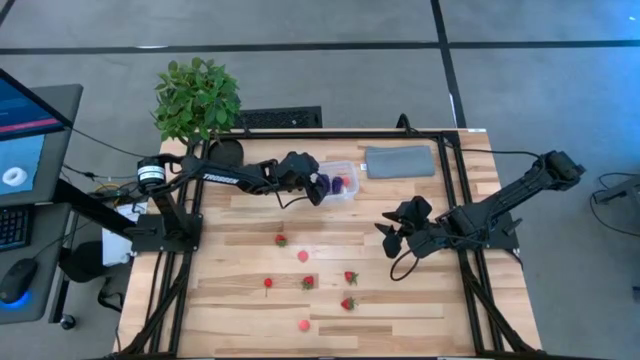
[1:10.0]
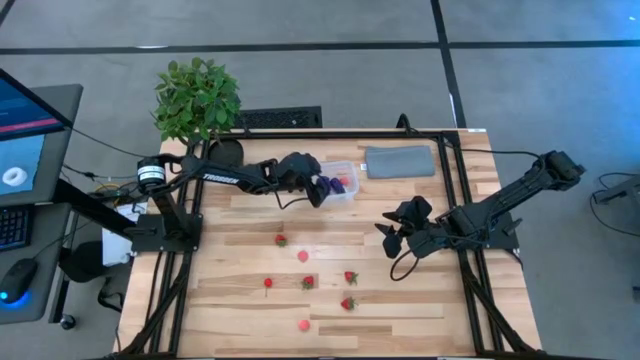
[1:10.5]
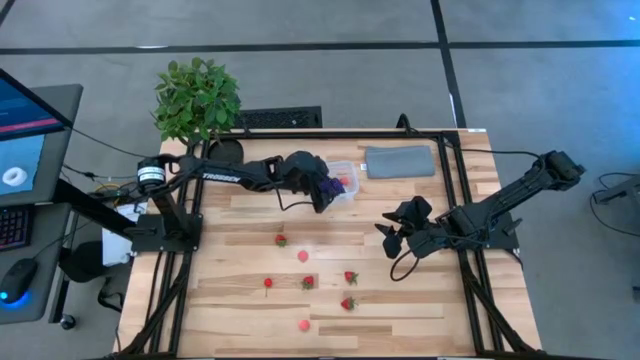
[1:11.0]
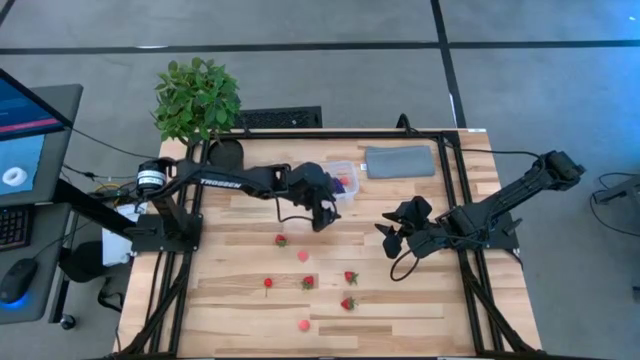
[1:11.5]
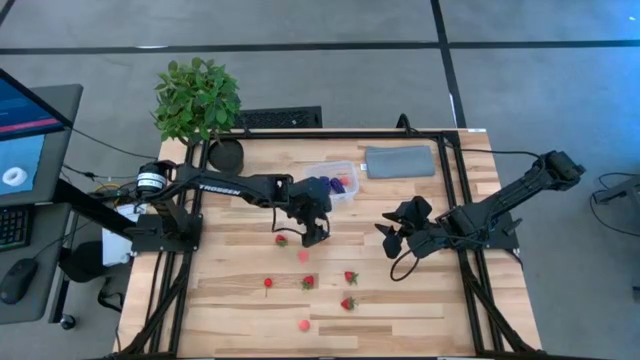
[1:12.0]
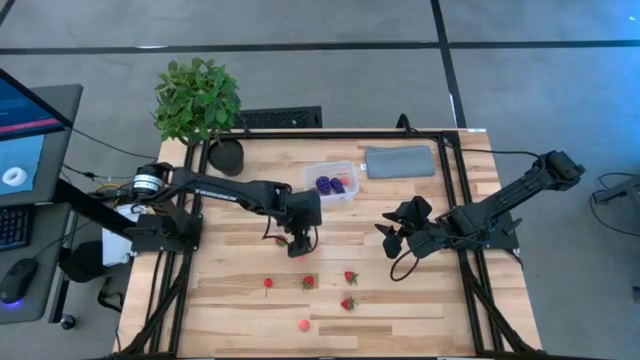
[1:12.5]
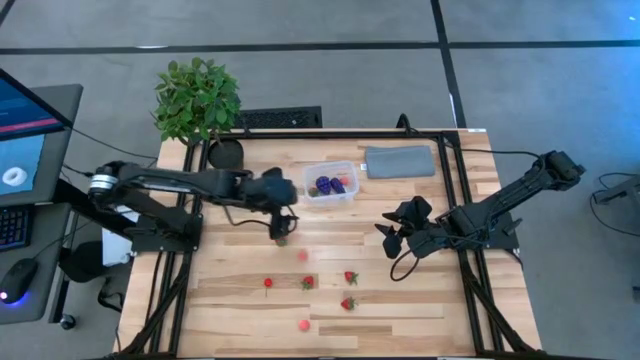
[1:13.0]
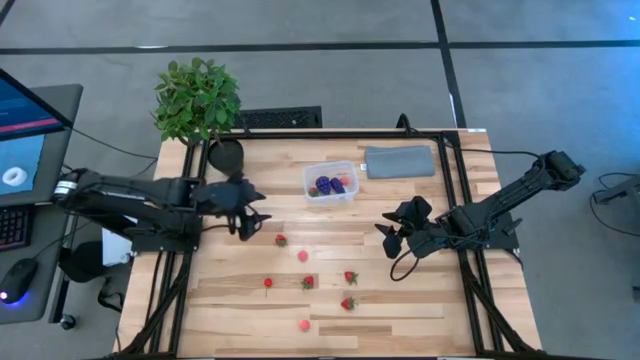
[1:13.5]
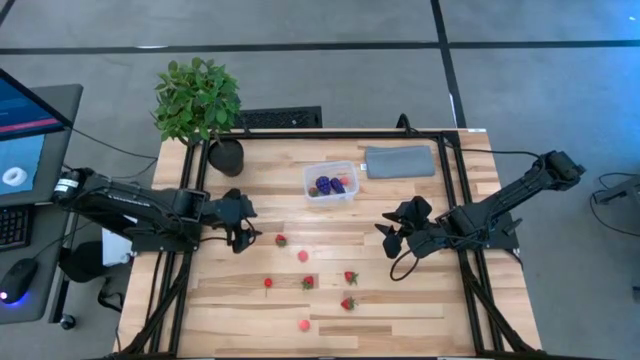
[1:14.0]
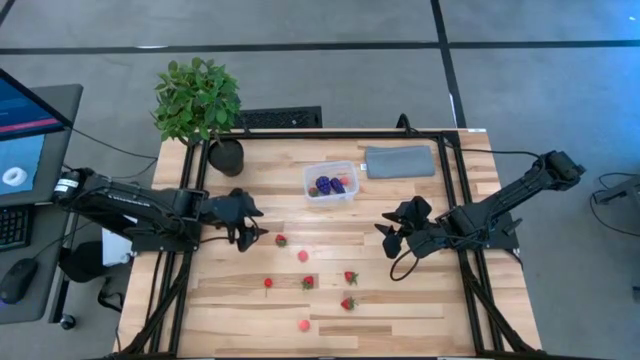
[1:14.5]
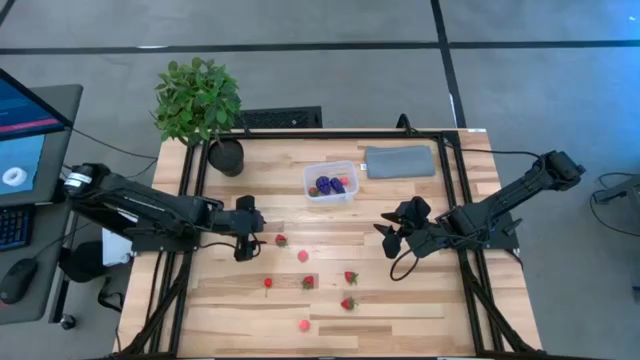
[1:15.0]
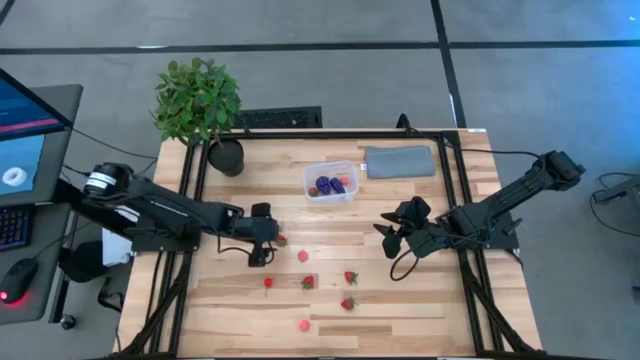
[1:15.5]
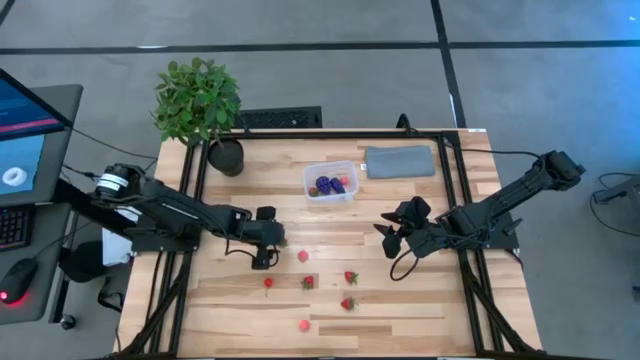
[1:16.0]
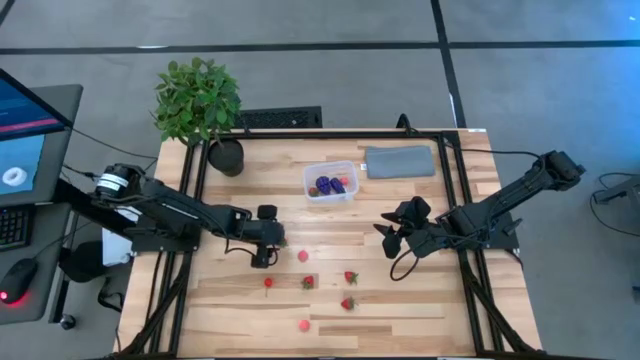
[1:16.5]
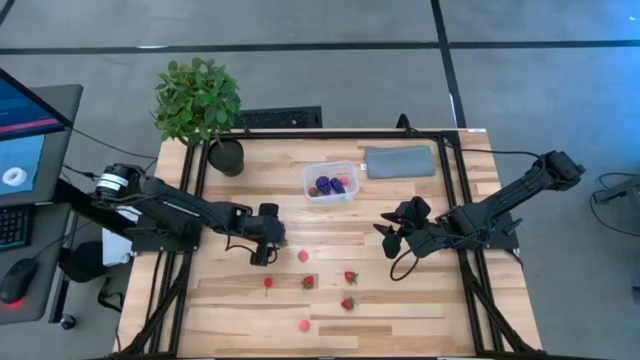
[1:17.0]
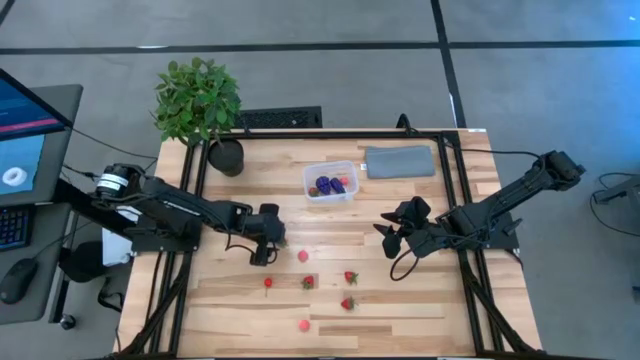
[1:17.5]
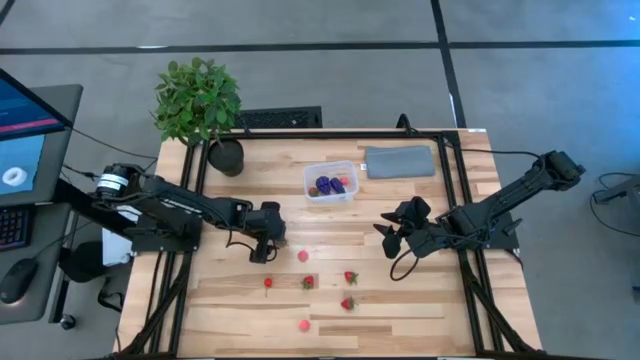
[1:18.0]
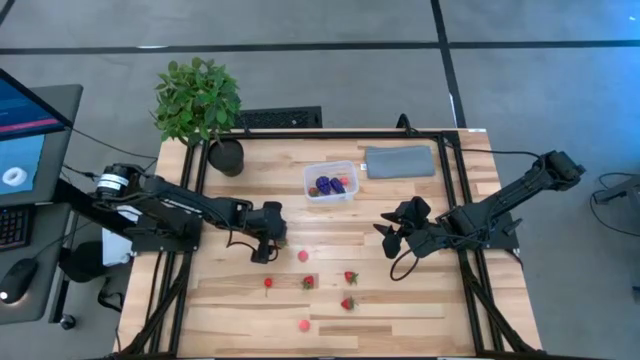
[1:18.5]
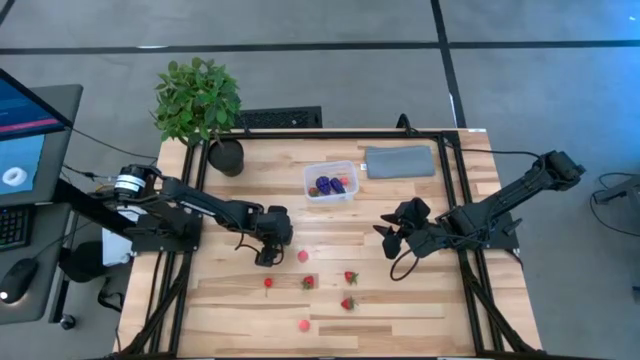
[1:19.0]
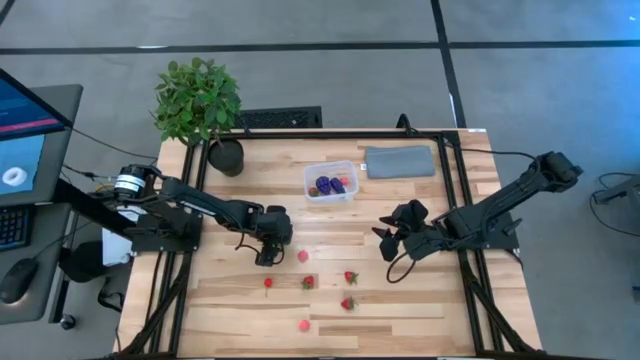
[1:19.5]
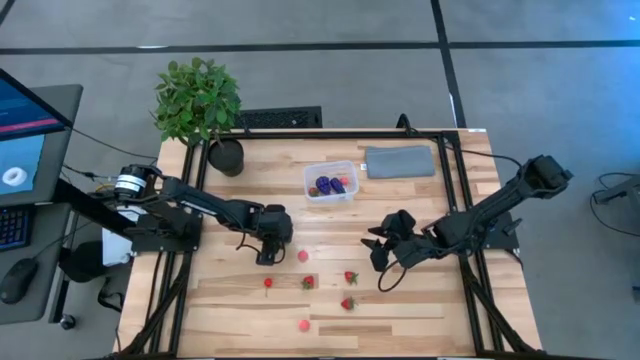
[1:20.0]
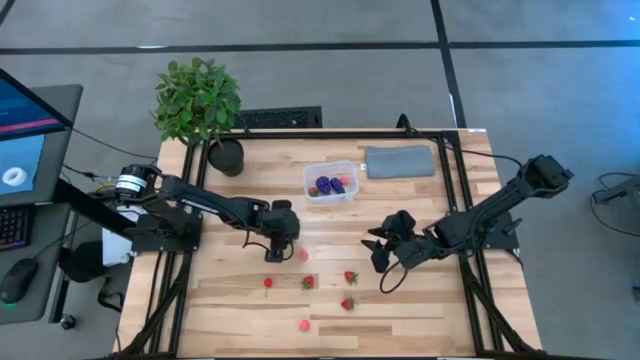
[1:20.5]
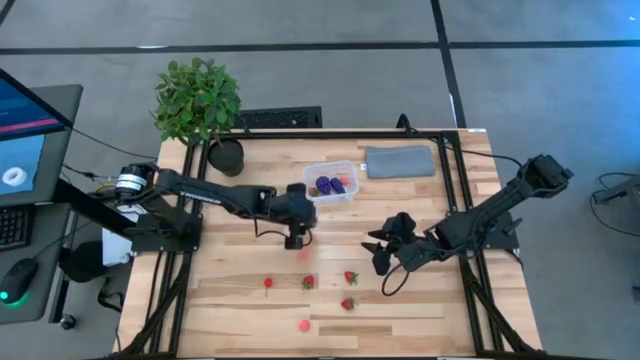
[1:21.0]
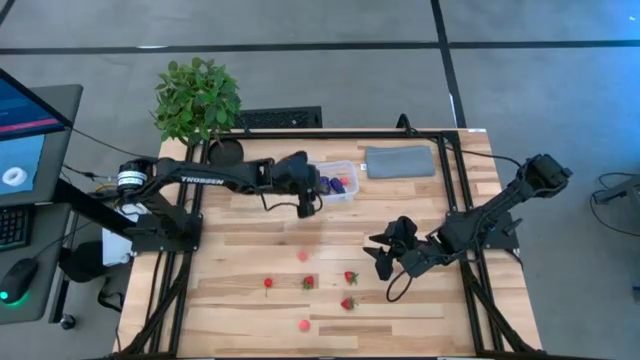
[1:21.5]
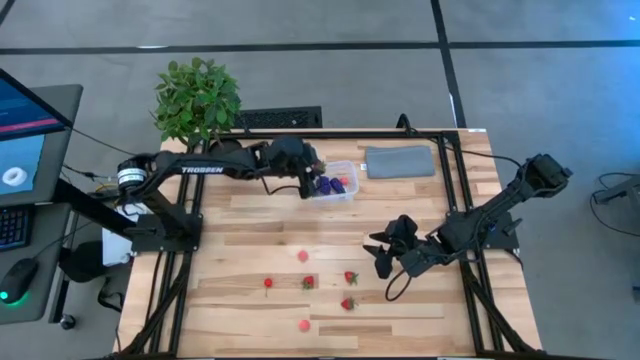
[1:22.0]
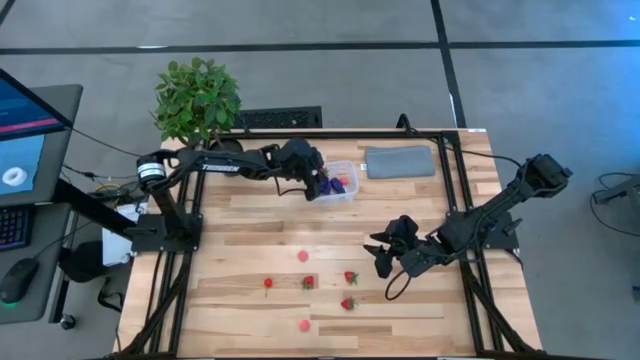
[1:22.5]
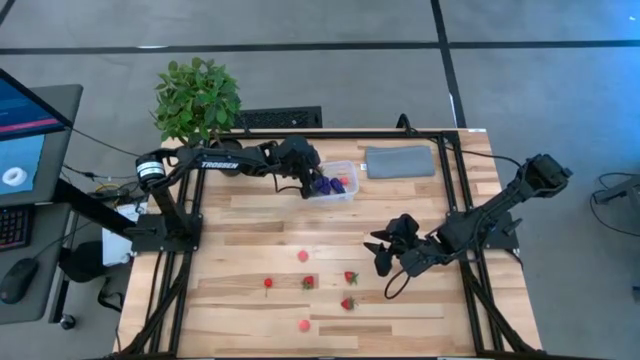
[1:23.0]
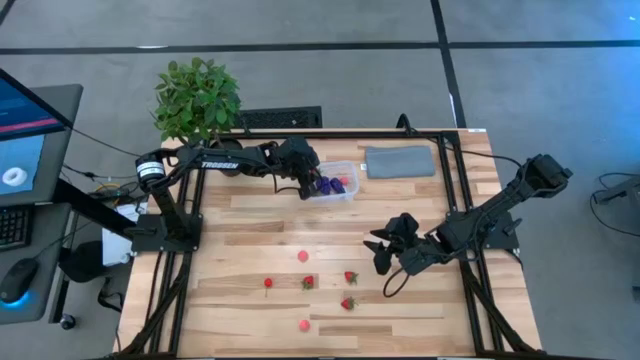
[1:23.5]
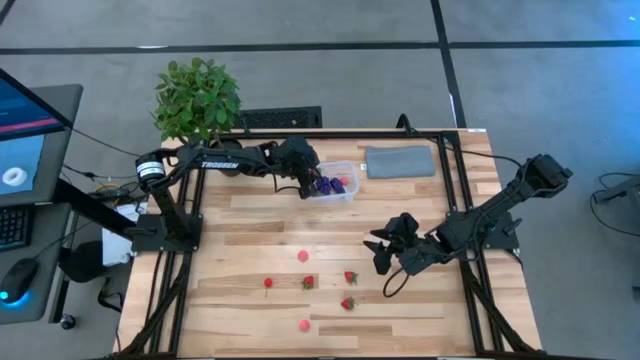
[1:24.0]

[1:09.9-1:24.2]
Task: Pick and placing Produce into tupperware
Put the strawberry into the container

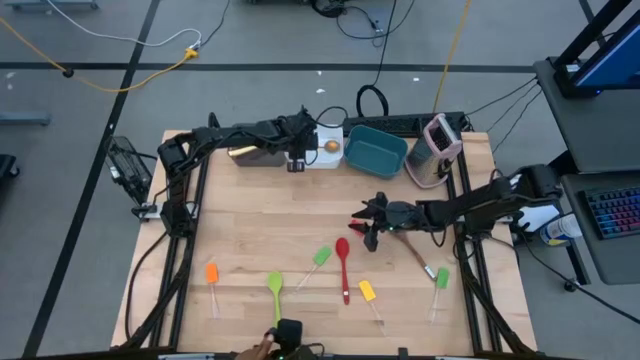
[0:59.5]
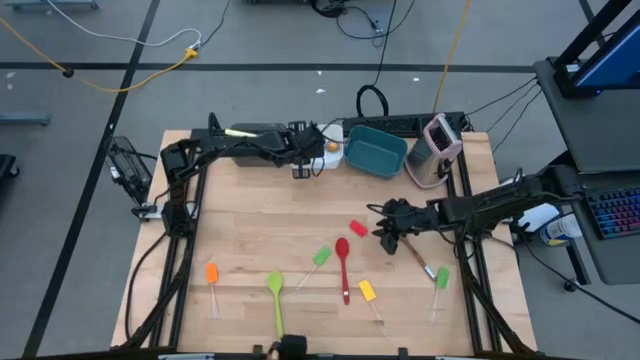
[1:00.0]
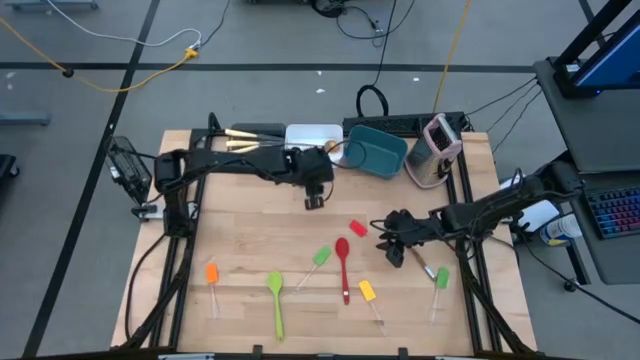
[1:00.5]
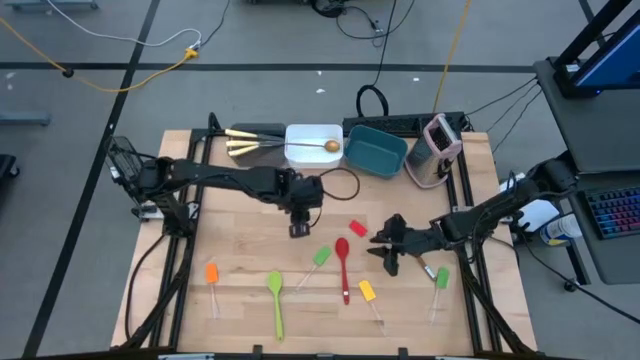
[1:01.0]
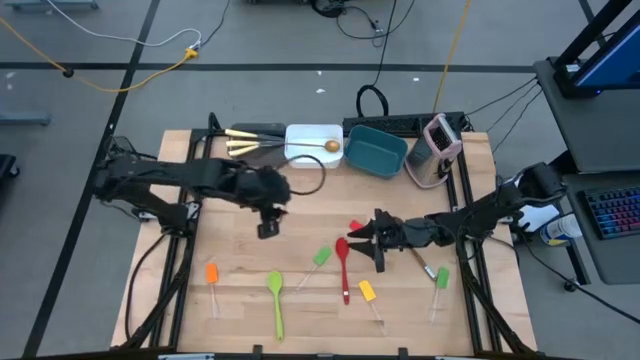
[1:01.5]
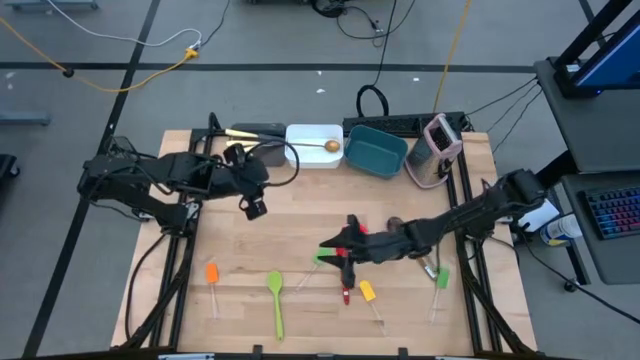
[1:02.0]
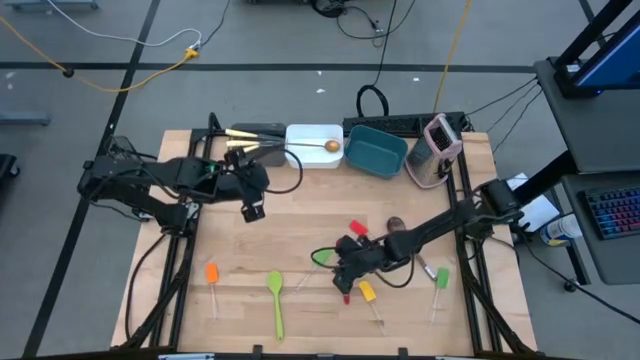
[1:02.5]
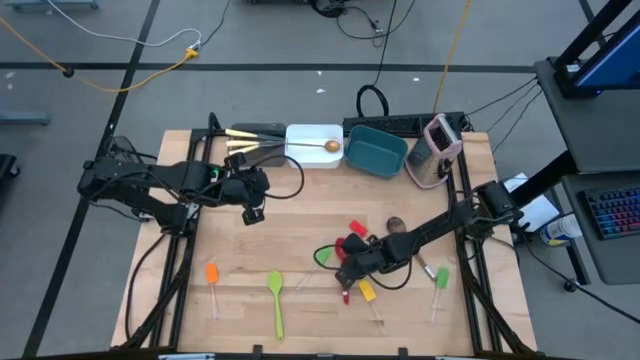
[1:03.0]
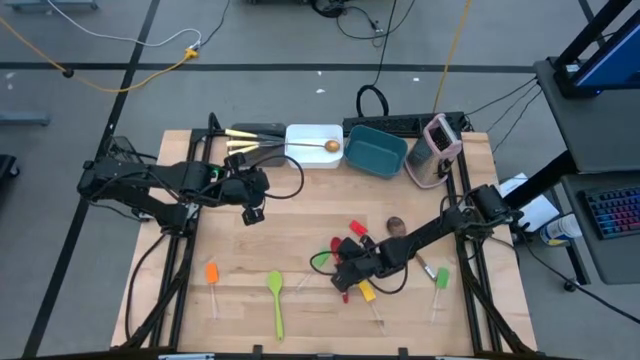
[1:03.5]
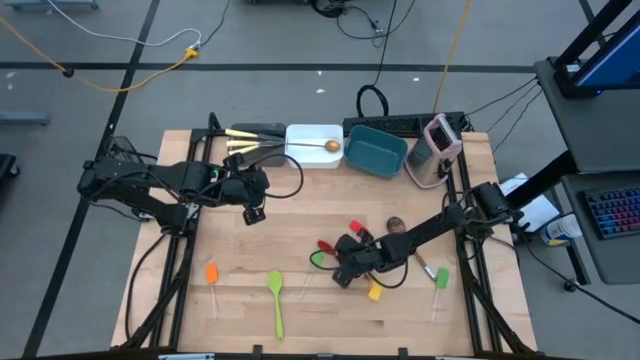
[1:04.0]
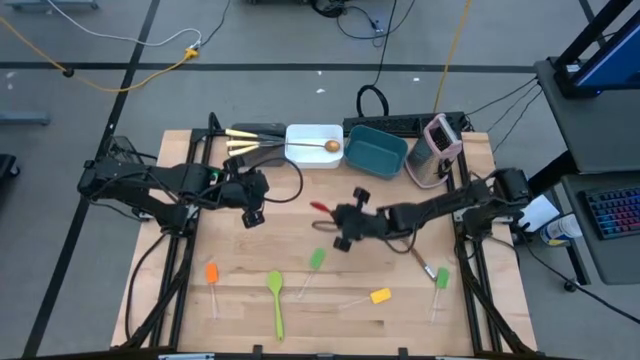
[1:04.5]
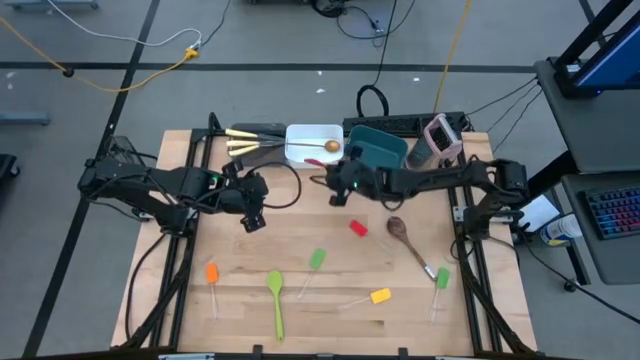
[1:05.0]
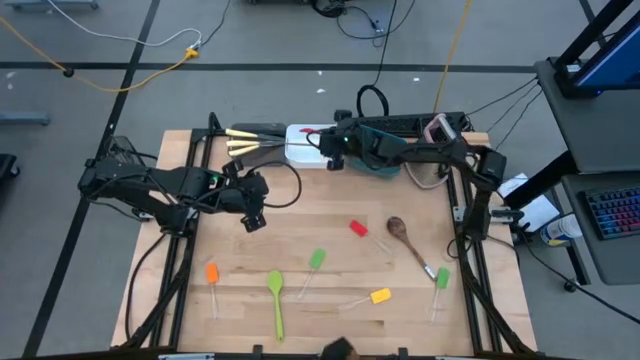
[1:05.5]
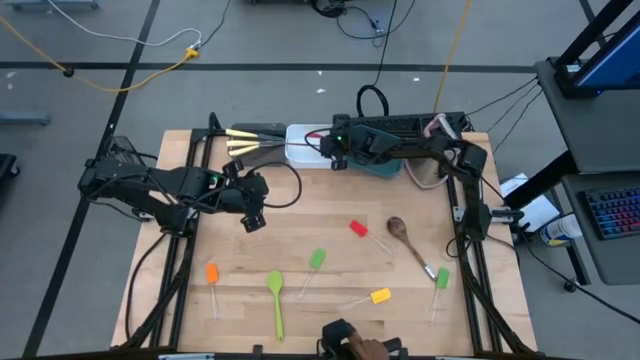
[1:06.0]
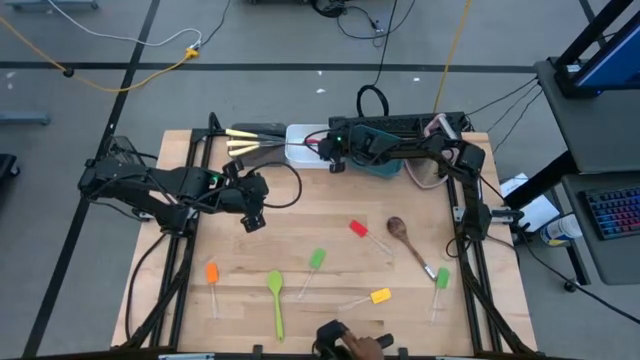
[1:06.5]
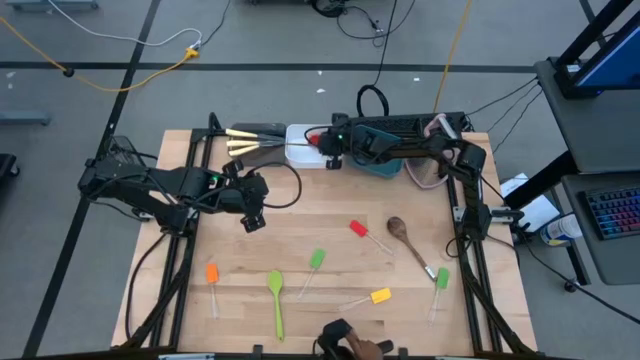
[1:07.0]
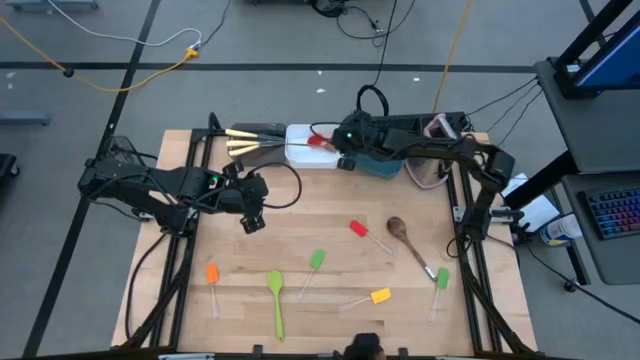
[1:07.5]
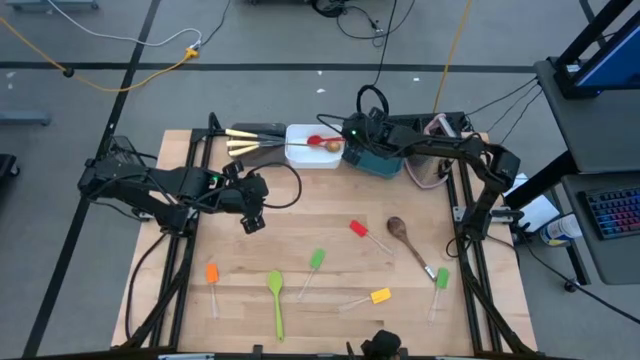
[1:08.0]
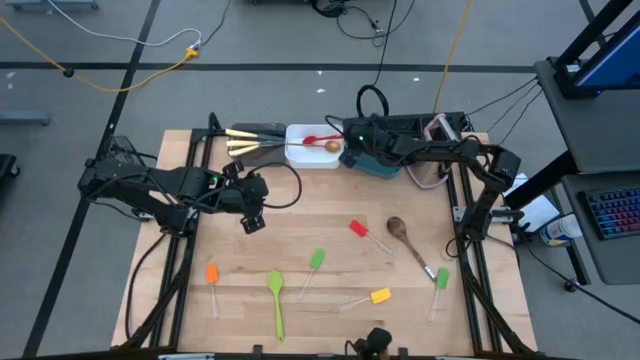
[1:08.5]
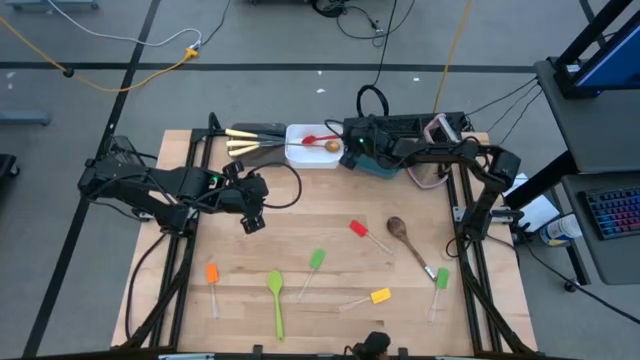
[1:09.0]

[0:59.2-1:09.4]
Task: Pick & Place Kitchen Items
Put the red serving spoon into the white bin
